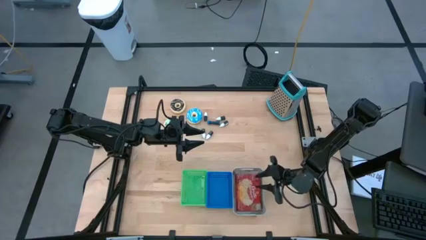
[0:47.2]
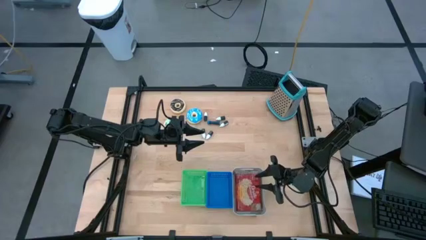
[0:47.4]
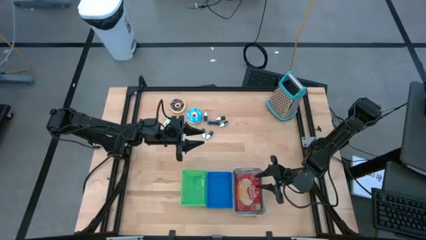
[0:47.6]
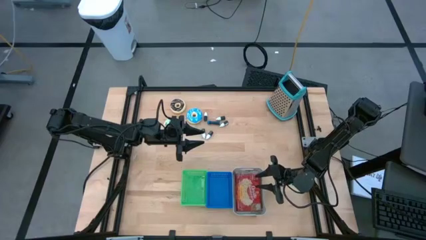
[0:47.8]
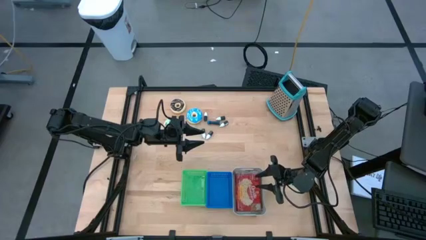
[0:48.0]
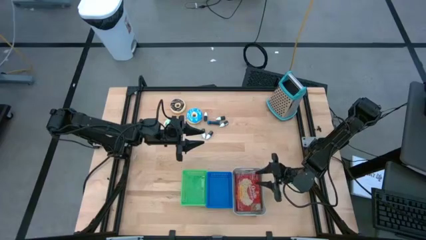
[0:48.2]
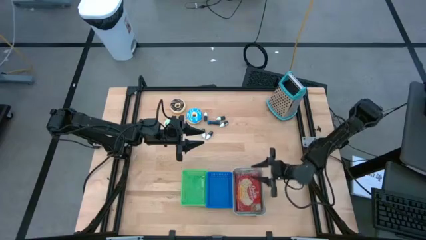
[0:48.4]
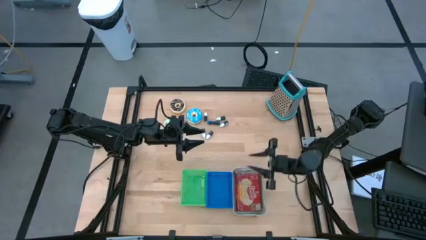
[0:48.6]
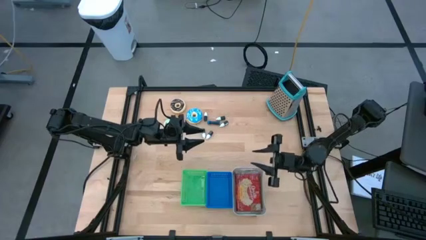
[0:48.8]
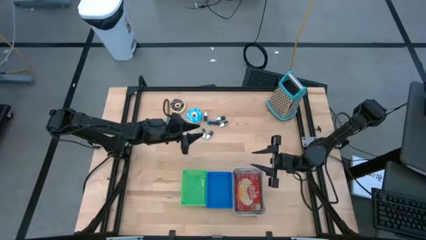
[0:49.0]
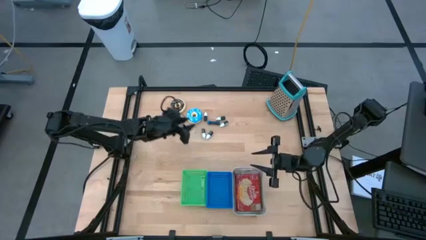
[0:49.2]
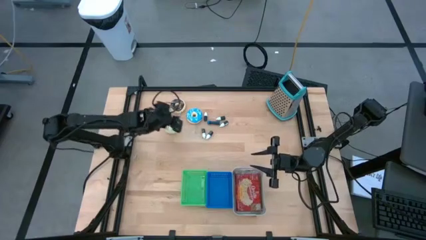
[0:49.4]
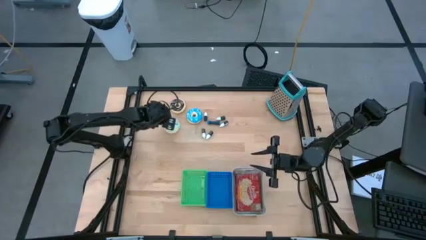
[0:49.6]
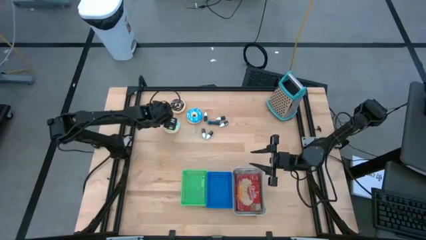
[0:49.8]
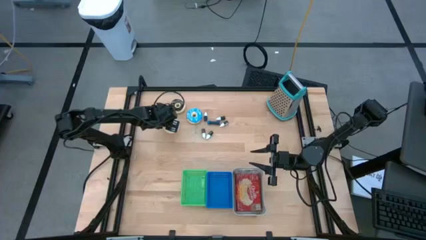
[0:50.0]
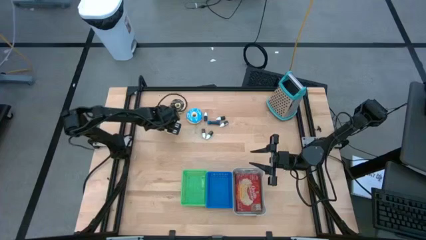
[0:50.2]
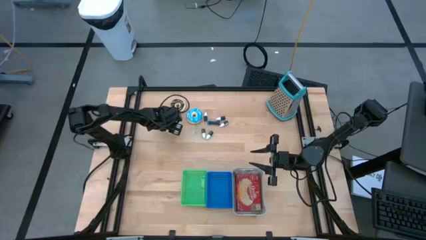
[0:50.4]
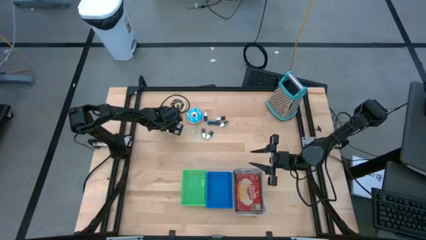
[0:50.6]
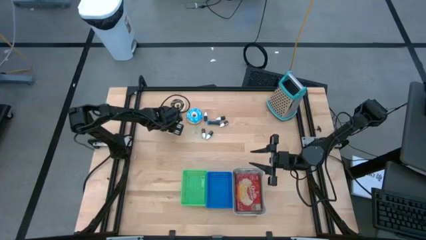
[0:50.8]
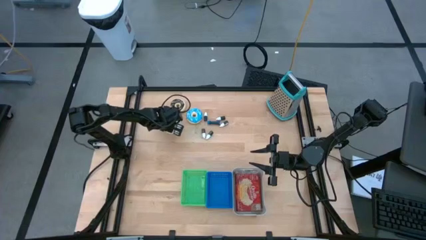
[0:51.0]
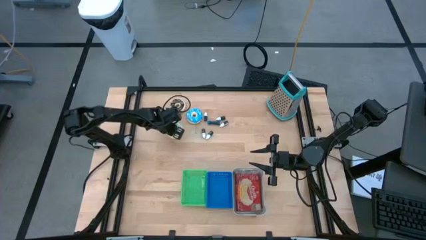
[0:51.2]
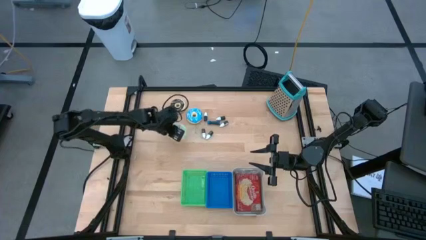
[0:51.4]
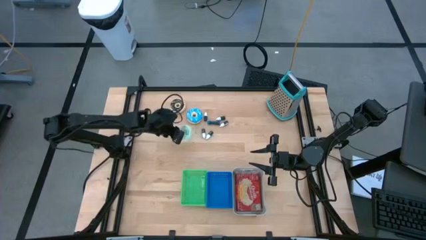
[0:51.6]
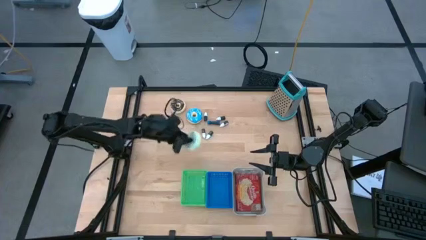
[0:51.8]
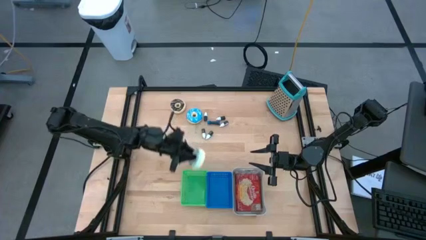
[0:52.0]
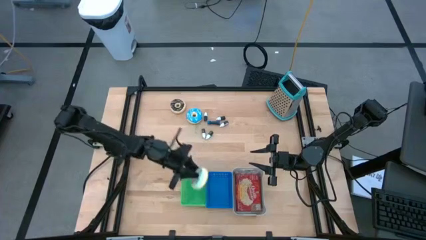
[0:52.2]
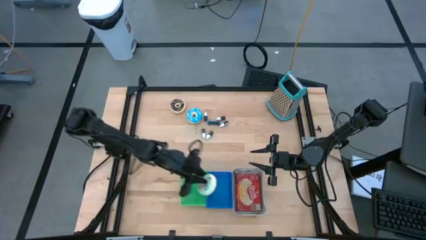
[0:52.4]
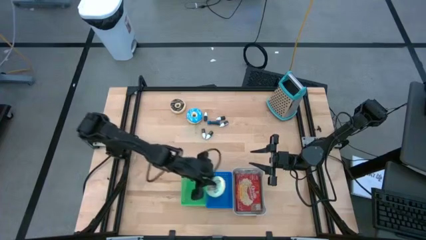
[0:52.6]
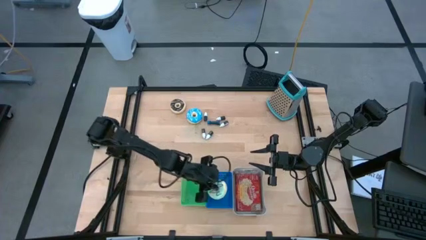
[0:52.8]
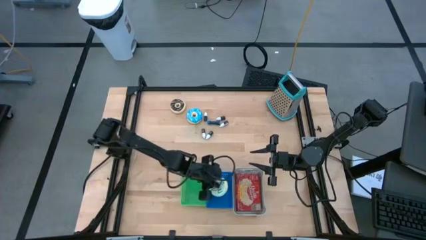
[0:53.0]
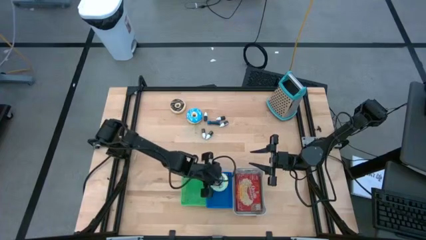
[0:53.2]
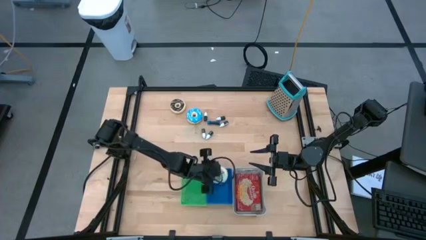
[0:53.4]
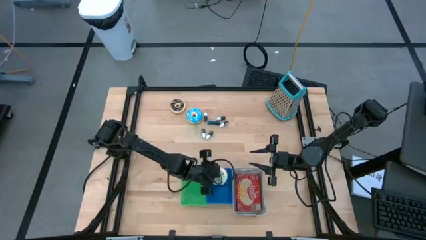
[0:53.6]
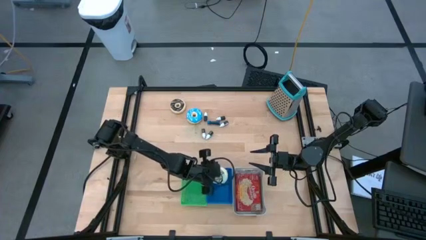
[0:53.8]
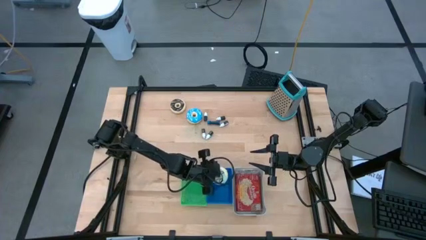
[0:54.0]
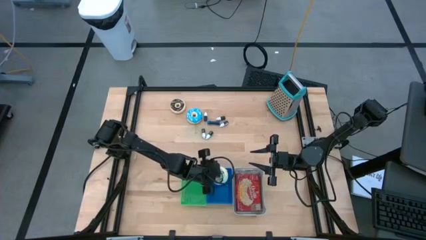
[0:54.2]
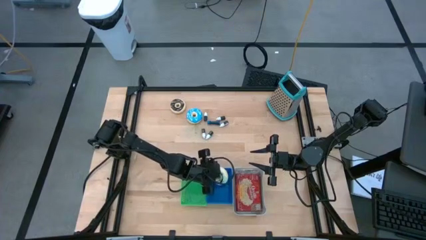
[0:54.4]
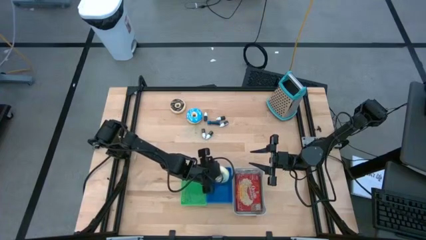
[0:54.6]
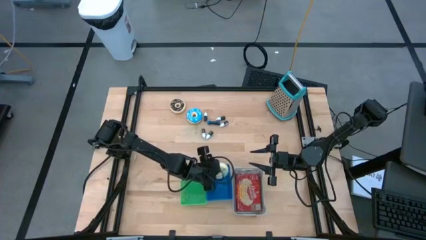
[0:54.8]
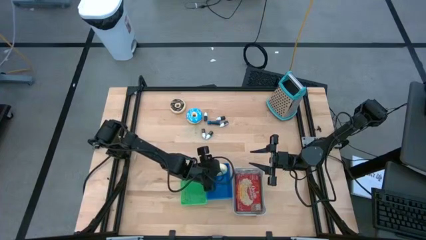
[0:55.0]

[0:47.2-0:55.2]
Put the light blue doughnut into the blue bin

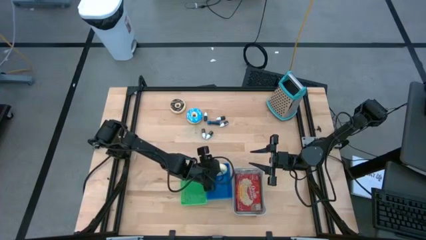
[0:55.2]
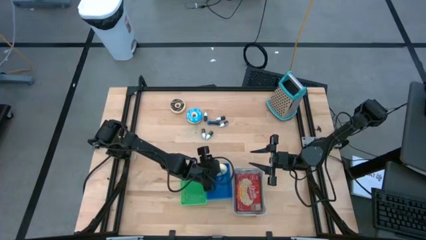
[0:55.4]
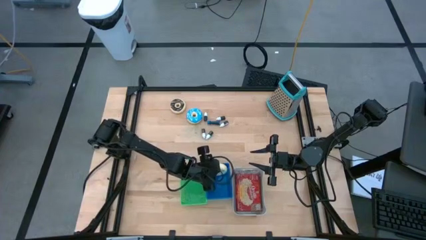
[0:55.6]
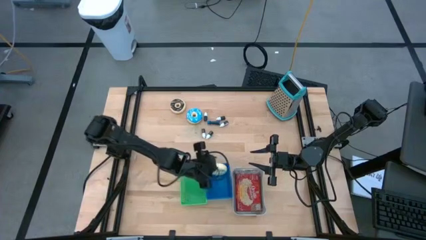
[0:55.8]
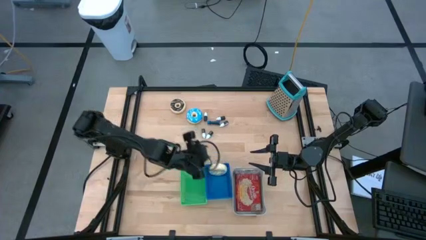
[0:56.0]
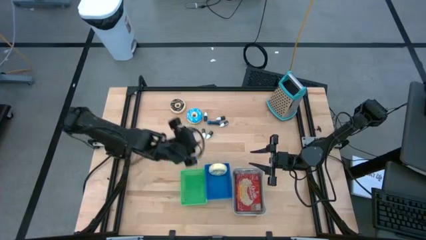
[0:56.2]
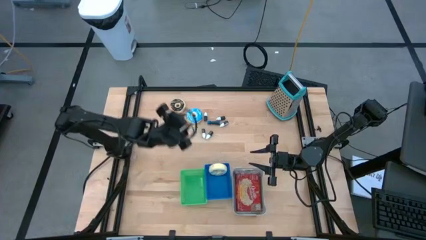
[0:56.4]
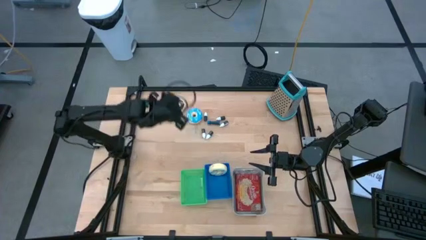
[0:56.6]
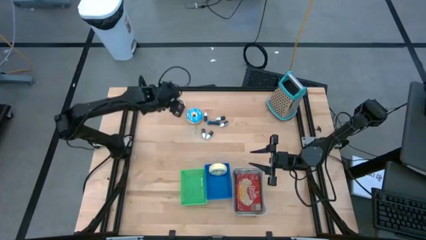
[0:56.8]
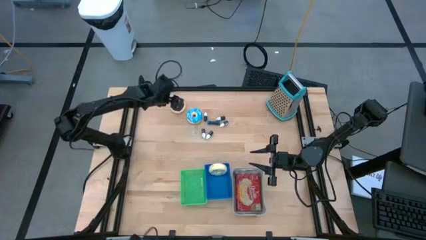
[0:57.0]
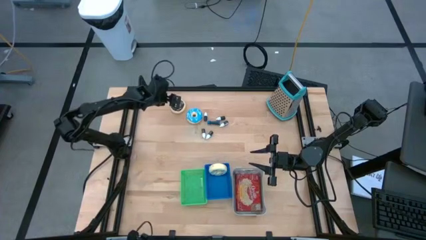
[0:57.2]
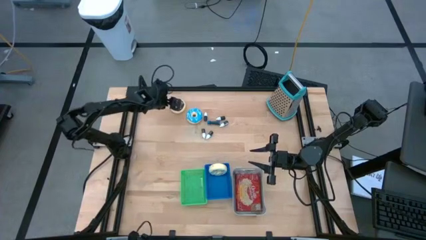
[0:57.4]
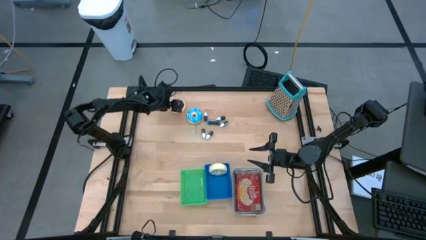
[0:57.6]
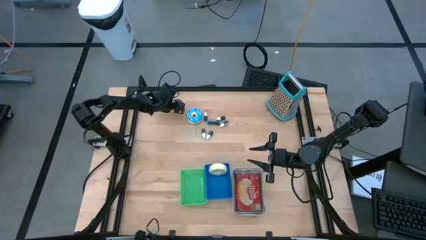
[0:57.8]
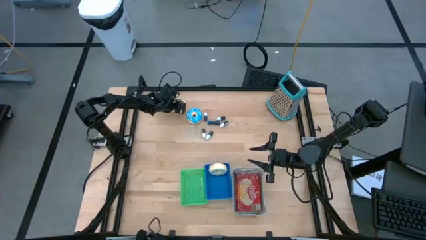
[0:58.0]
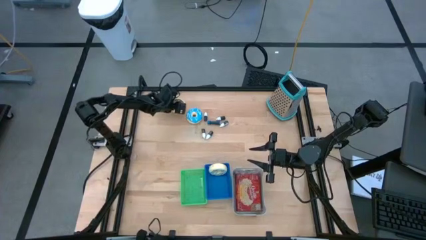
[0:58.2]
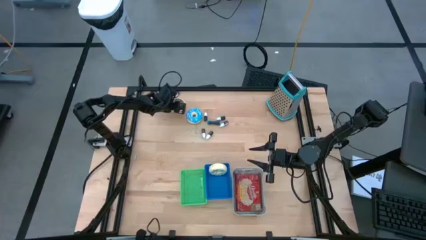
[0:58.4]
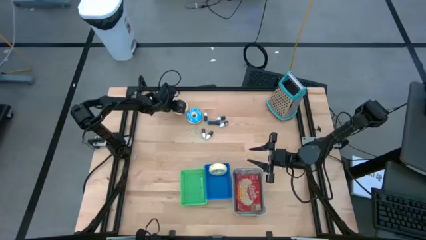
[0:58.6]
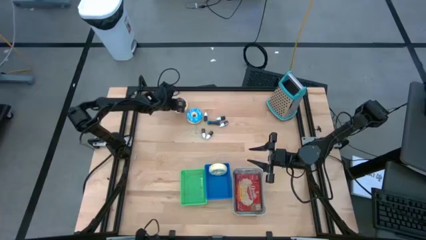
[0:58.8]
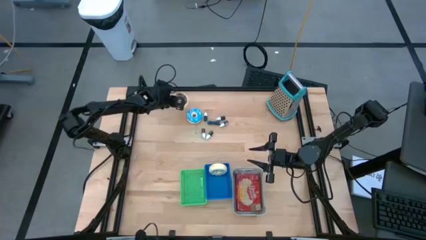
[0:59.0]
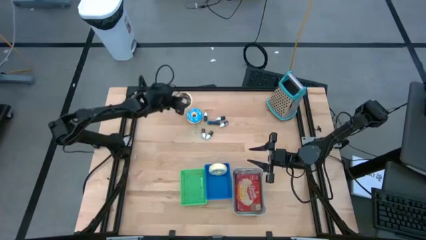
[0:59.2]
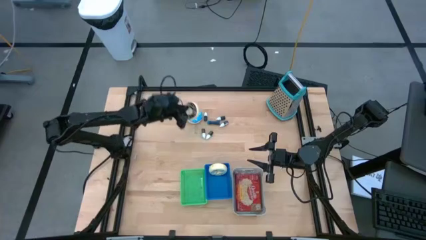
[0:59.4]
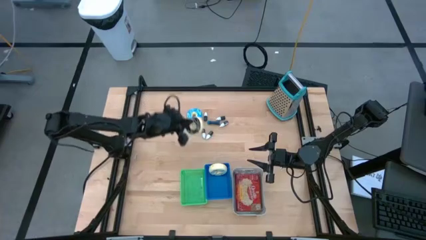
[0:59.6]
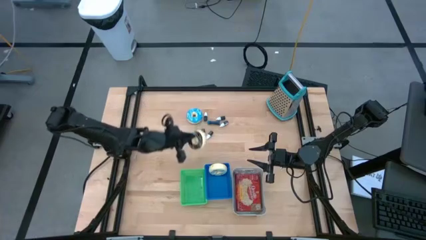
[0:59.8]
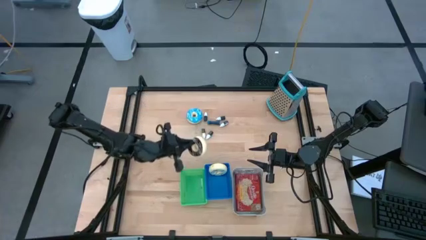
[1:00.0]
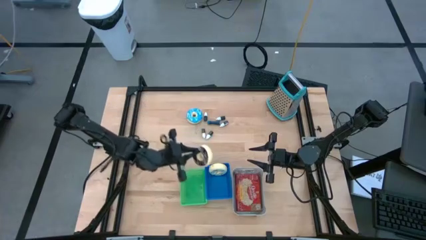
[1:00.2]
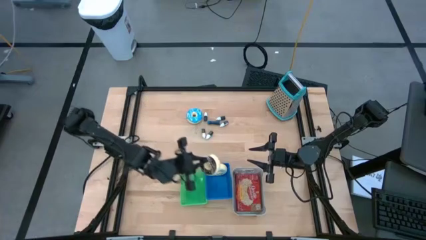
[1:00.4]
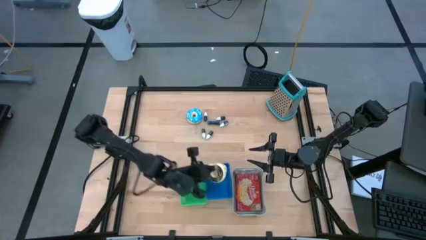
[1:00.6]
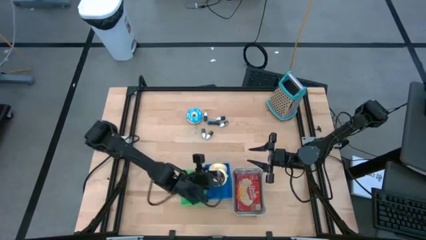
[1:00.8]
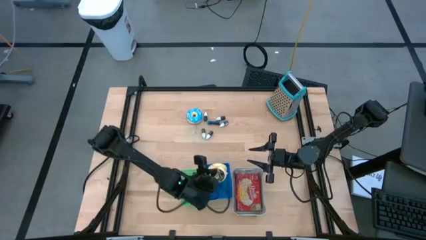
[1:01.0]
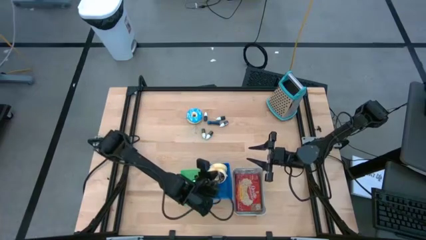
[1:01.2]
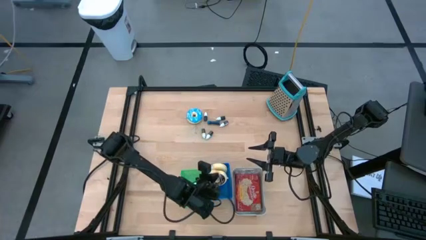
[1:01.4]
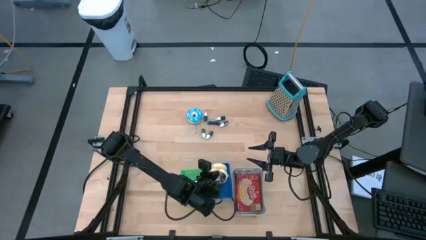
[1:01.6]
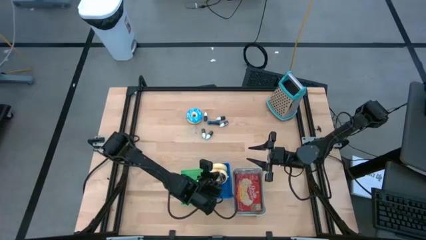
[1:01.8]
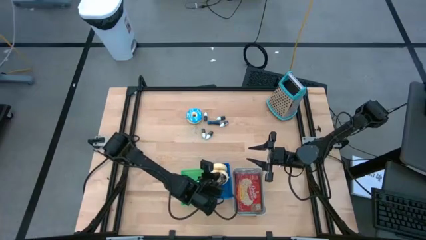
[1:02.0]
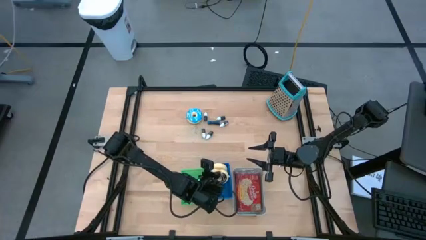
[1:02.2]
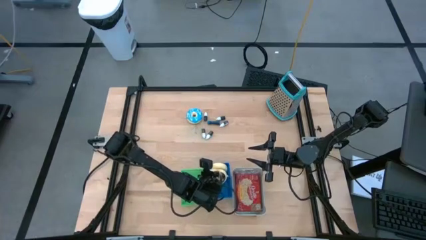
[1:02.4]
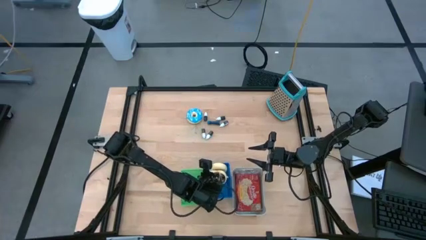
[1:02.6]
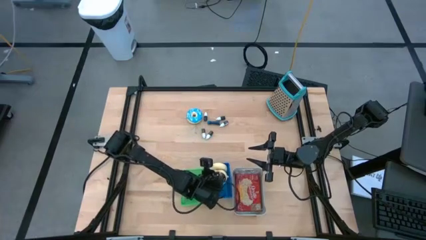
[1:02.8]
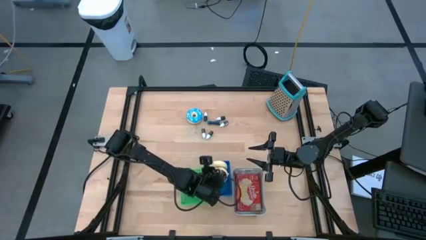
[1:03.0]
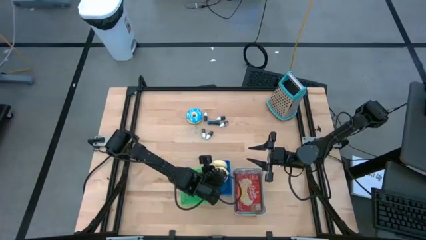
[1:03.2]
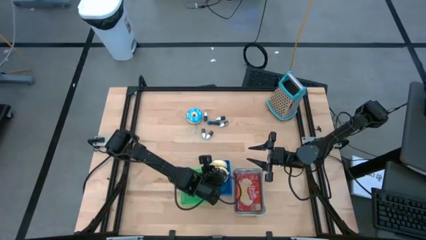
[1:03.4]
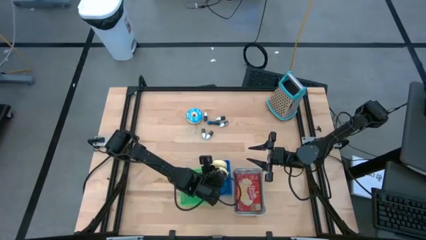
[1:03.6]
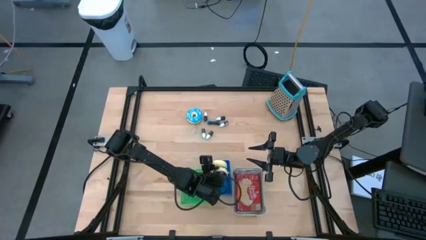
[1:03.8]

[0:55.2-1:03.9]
Put the black doughnut into the blue bin
